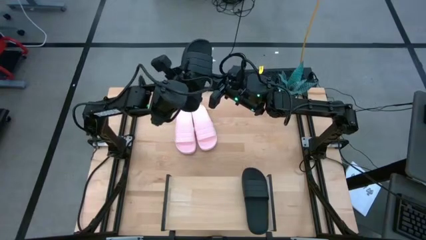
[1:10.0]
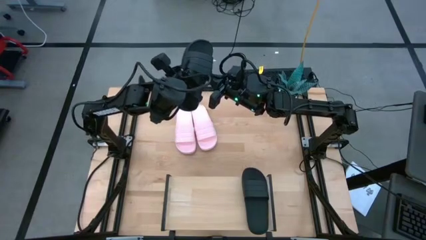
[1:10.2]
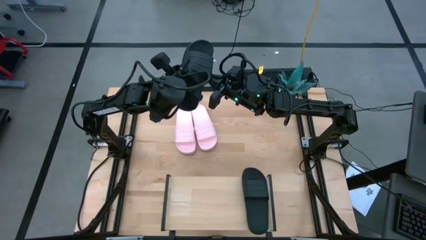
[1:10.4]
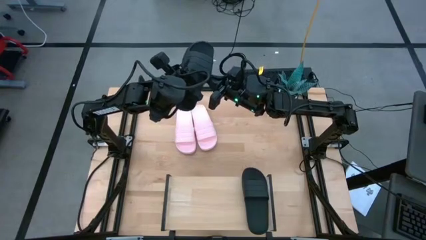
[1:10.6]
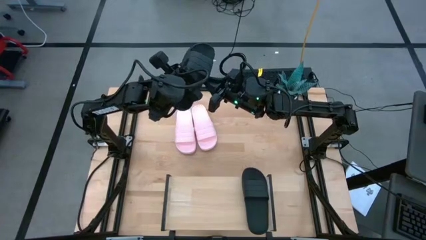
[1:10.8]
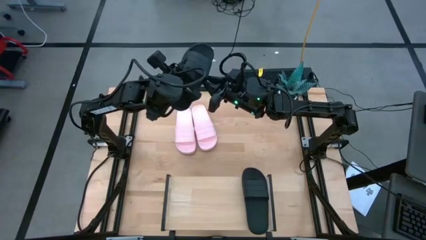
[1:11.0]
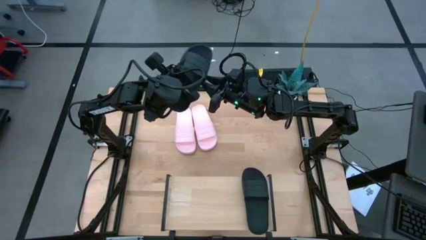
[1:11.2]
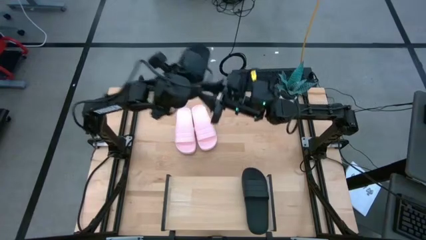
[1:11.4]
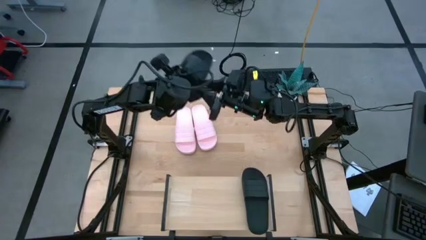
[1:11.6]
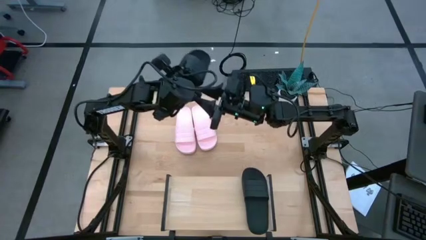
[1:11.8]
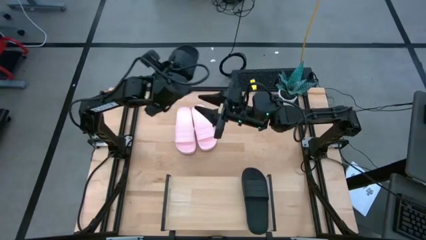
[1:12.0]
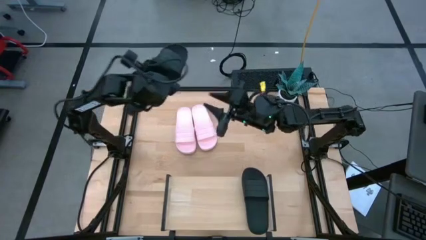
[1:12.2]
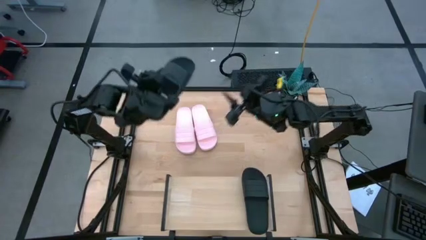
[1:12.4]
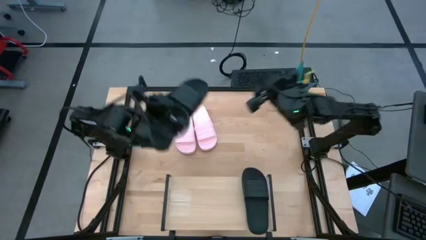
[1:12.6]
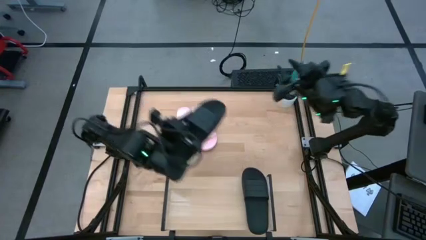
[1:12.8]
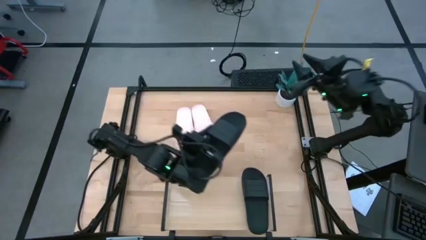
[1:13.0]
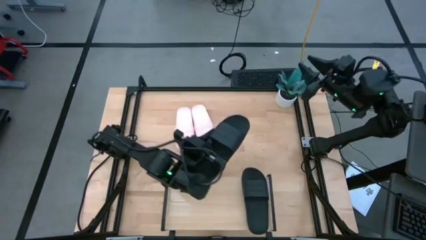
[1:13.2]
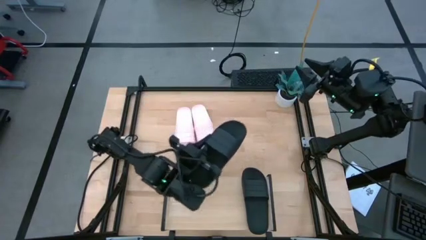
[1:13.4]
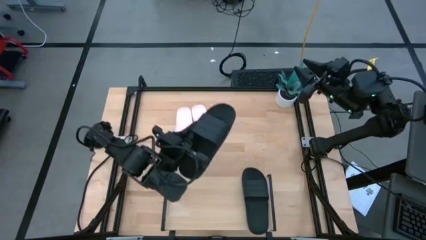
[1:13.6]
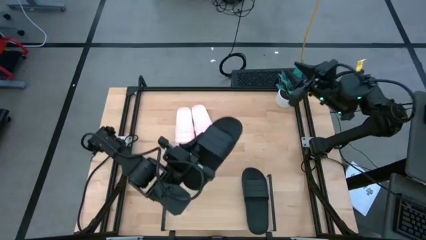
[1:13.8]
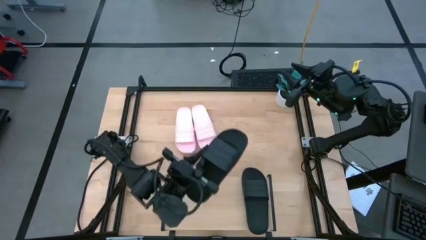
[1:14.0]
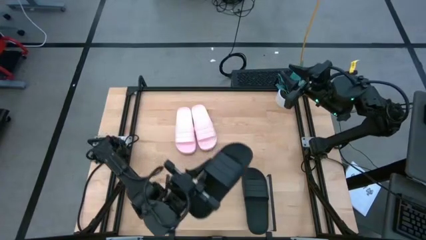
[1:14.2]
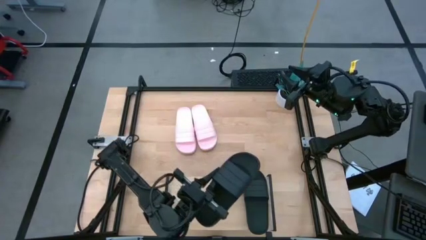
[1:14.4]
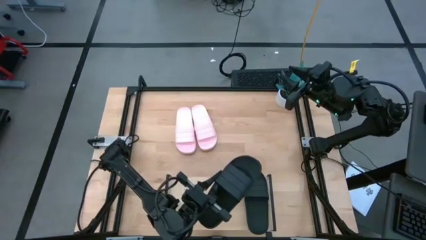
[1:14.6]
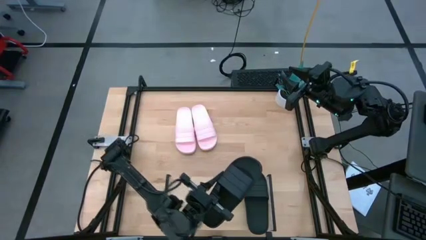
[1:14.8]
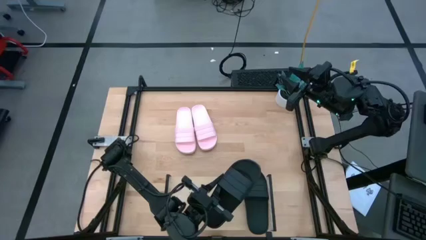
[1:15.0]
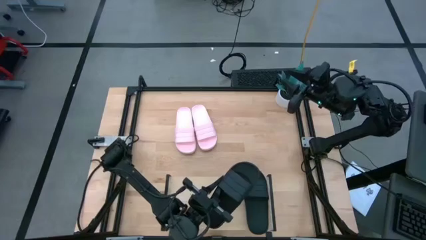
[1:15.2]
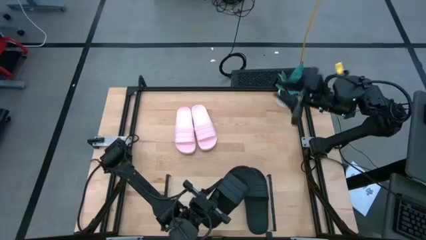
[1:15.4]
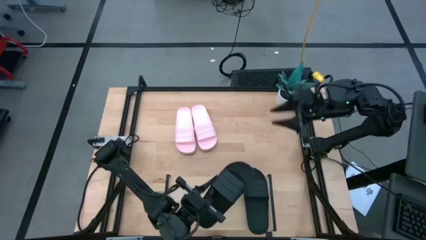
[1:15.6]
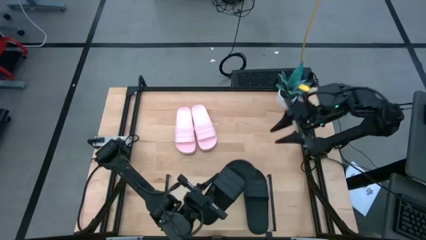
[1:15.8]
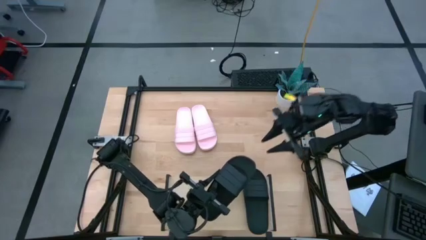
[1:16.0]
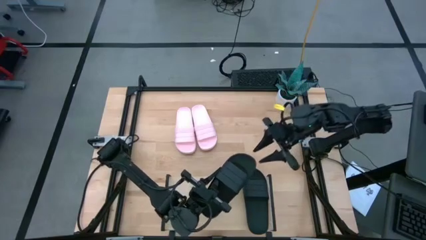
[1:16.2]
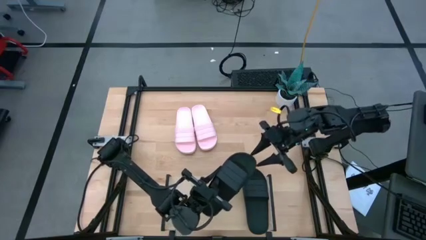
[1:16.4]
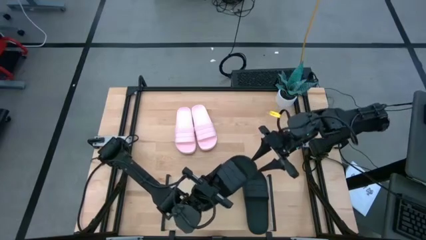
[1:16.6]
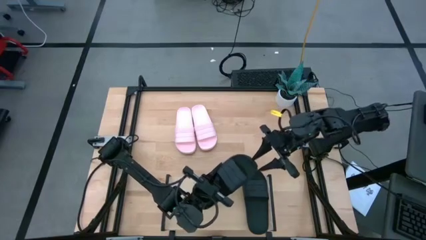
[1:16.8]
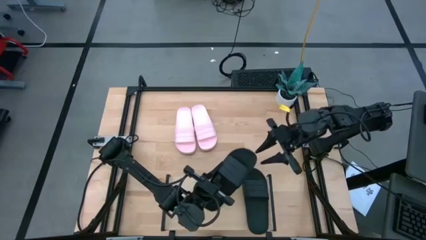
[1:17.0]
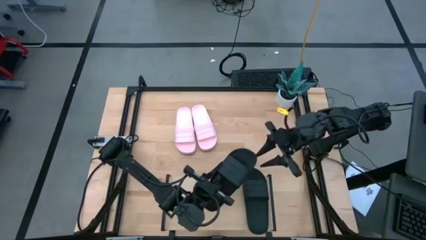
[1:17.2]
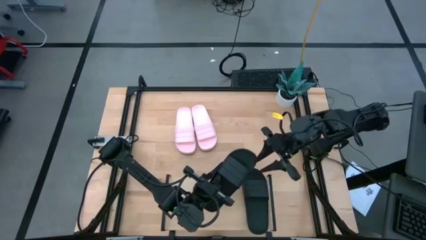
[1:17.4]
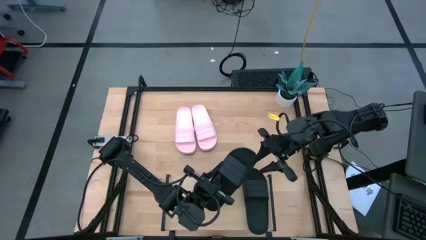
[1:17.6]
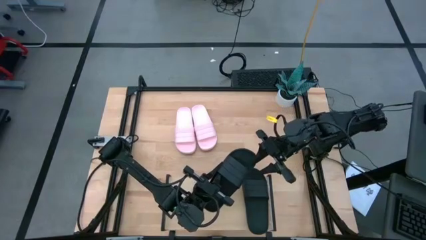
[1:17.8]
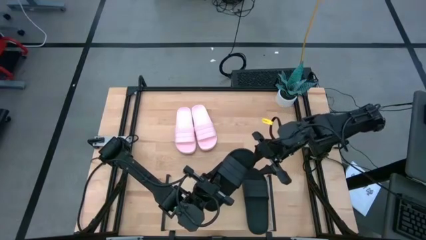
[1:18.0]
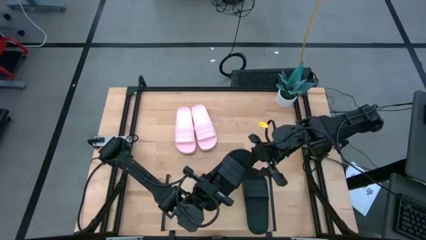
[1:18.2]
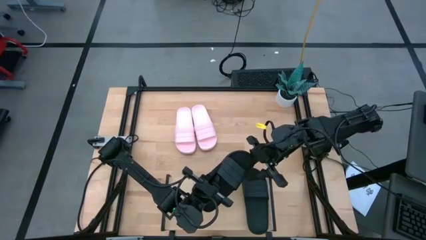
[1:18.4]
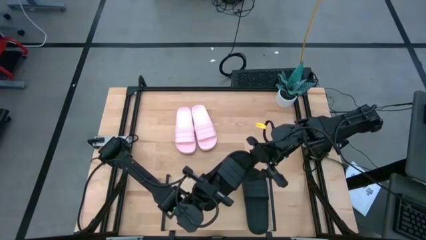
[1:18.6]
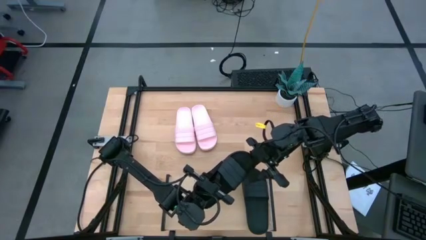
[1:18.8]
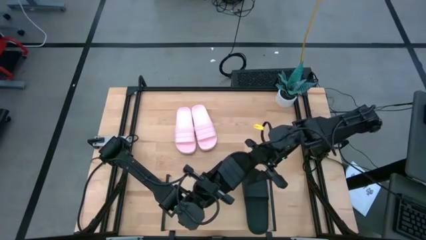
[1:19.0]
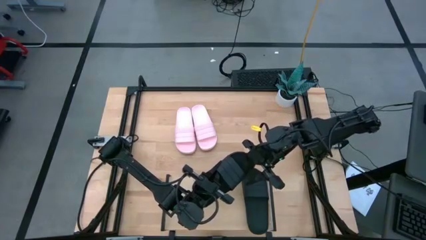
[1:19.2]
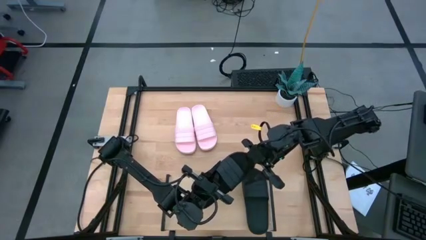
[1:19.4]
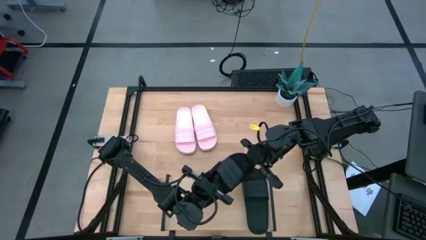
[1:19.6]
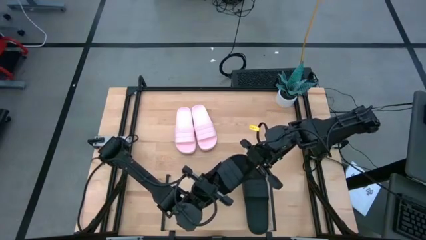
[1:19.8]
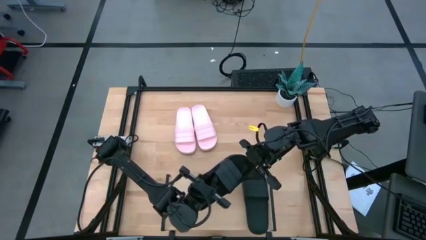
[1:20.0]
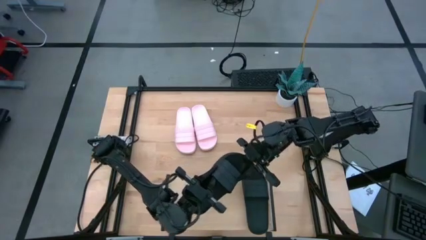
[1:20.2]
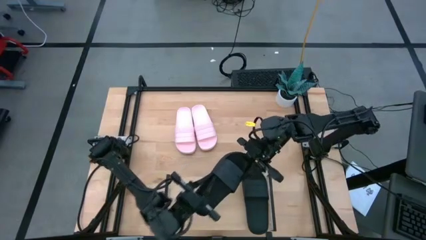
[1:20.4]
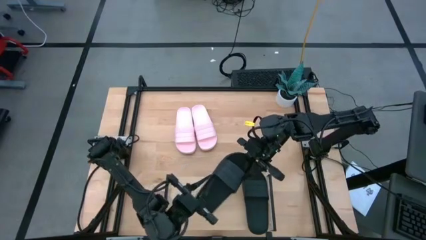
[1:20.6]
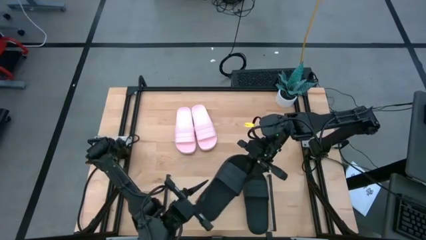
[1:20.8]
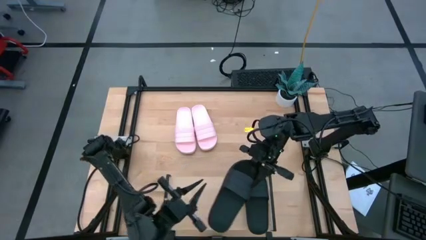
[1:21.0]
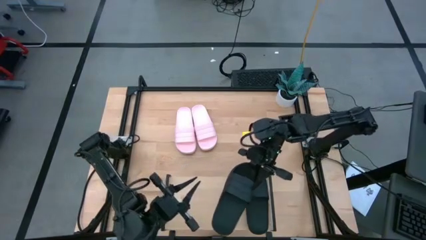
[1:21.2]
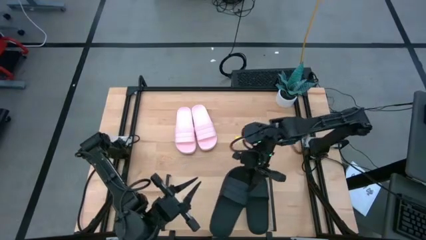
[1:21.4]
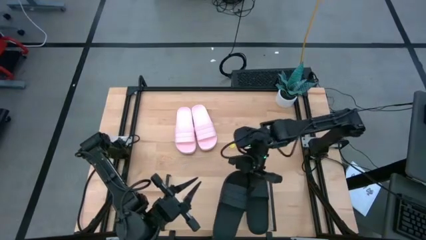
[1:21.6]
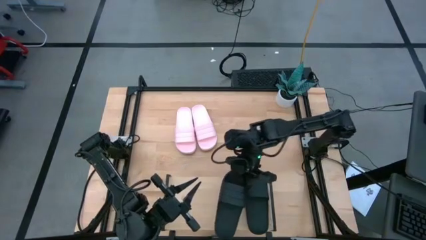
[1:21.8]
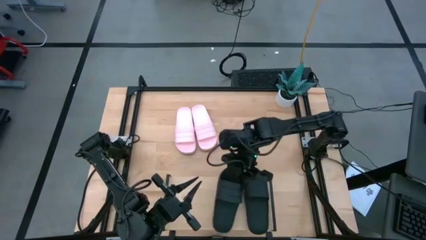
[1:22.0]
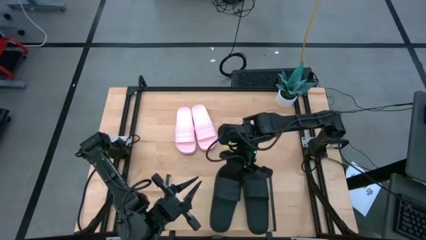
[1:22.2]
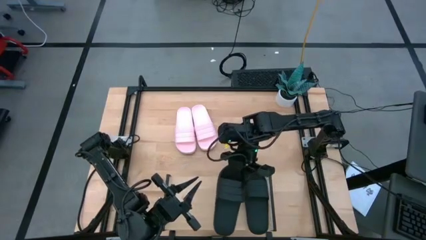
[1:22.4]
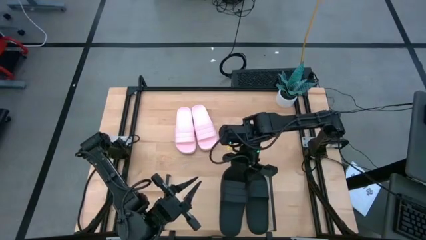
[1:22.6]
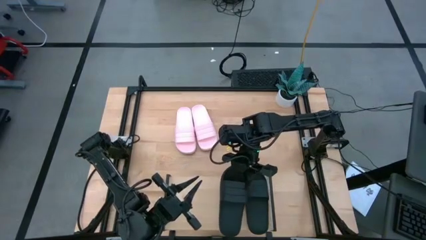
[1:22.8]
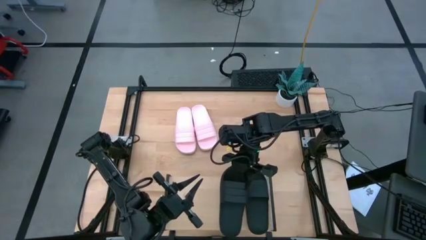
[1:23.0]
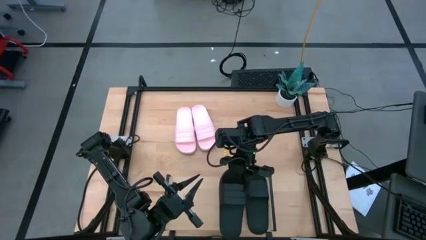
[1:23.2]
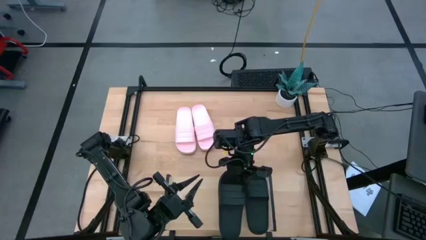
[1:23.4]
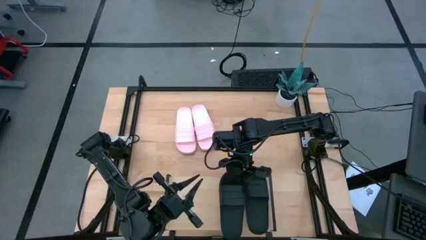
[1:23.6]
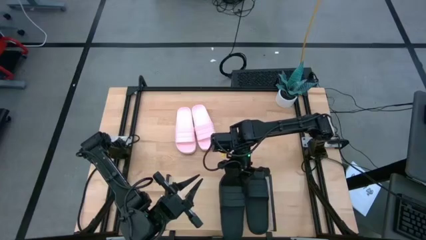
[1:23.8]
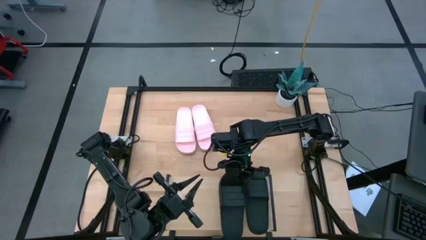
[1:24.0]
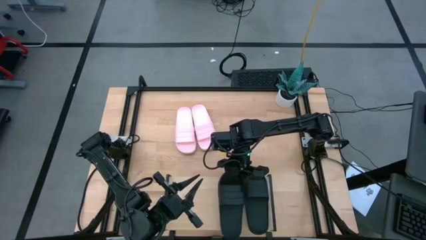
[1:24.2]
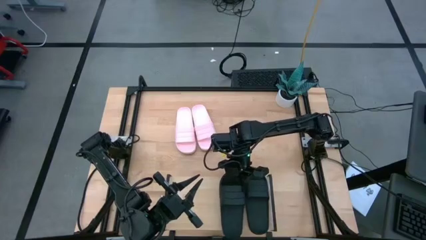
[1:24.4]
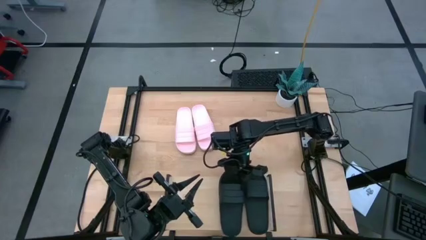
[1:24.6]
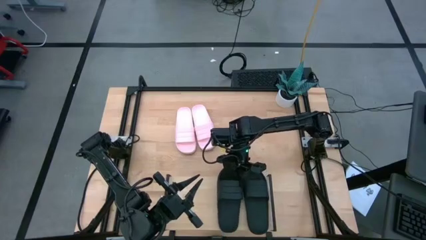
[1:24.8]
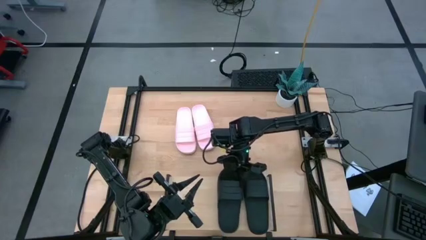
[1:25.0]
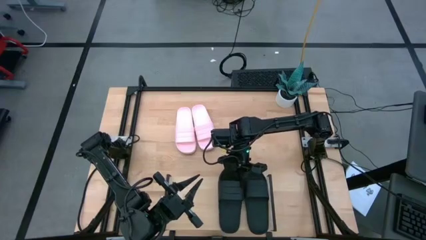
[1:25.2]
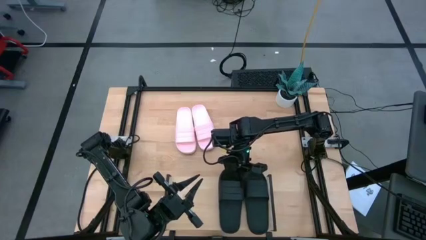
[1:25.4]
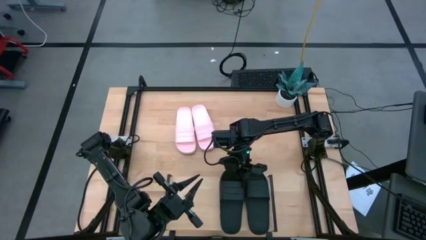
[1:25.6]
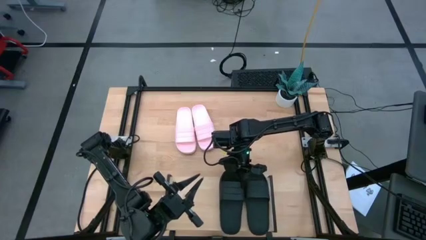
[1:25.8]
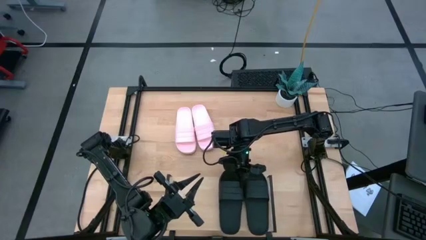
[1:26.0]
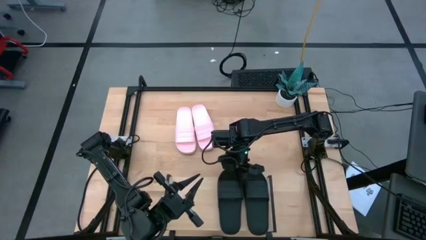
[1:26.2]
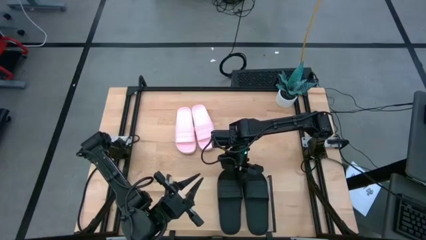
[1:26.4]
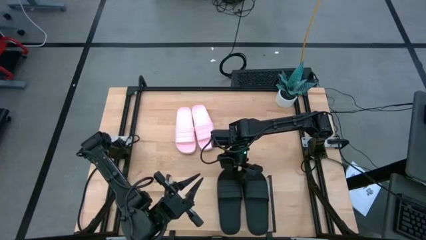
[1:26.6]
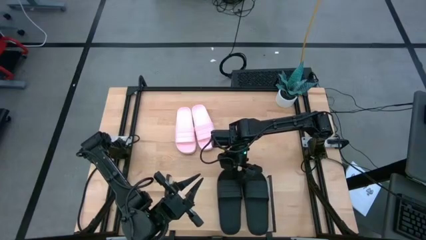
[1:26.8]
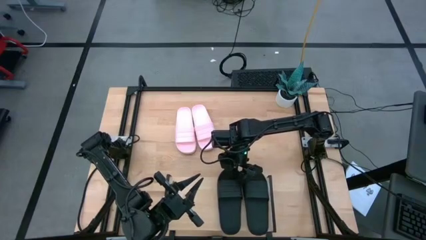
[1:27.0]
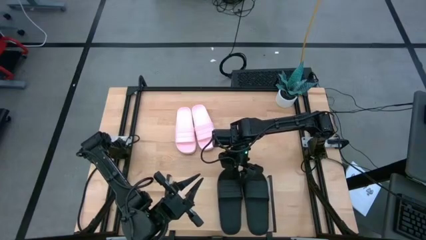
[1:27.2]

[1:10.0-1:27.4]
Task: Pick and place slides into the shelf
Put the black slipper on the shelf
